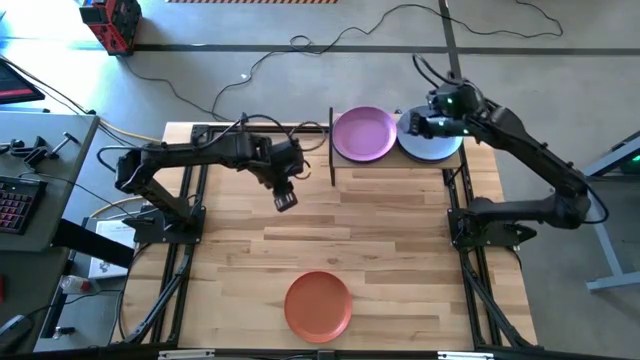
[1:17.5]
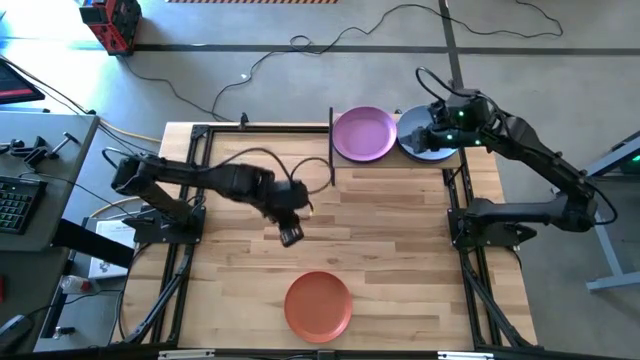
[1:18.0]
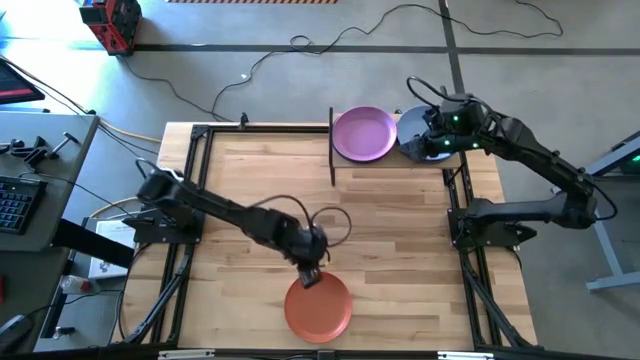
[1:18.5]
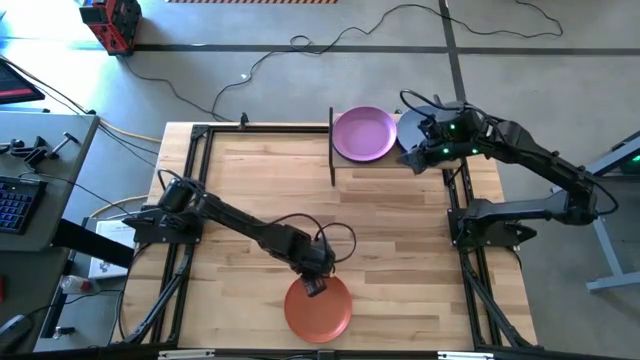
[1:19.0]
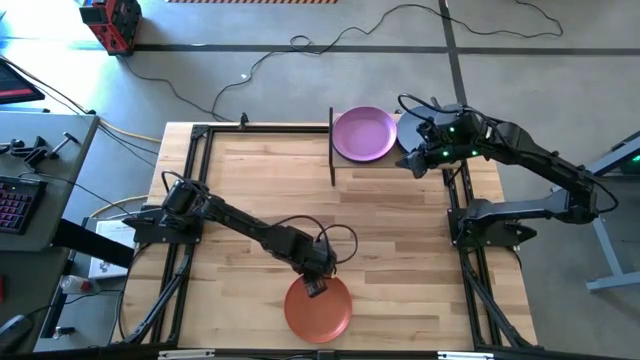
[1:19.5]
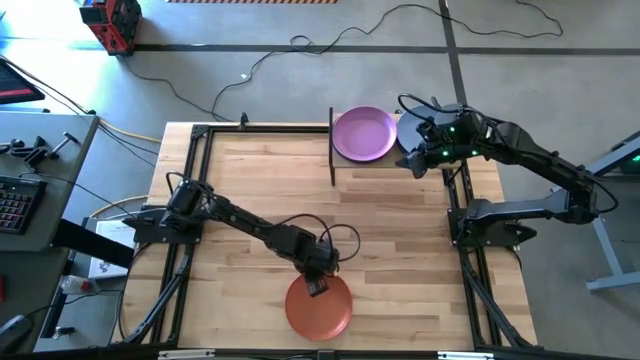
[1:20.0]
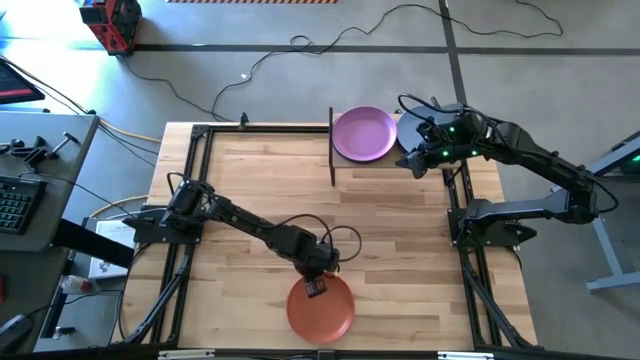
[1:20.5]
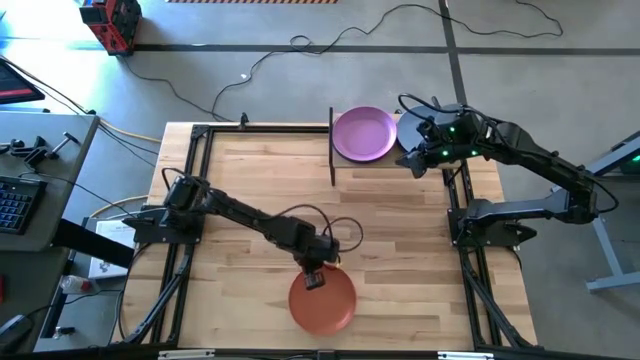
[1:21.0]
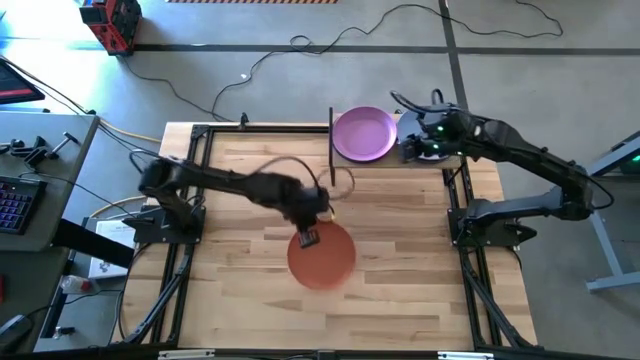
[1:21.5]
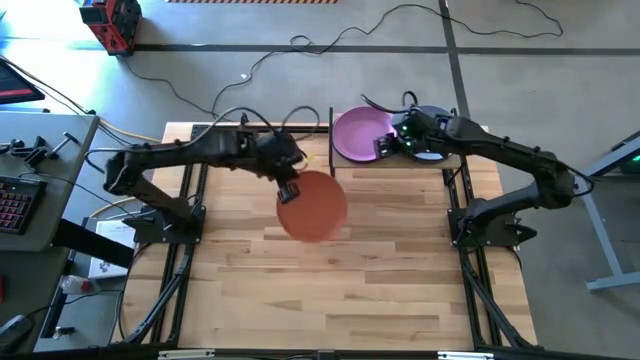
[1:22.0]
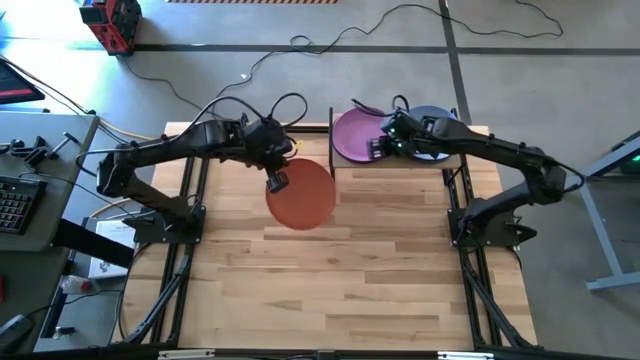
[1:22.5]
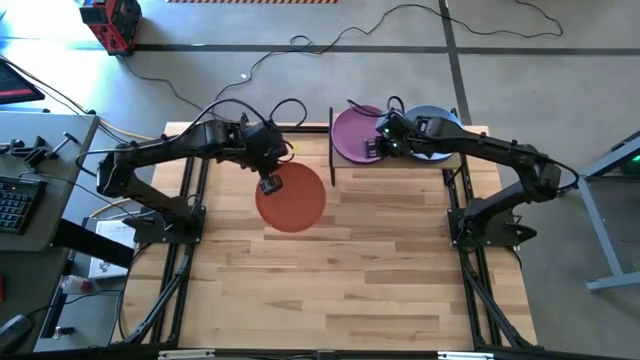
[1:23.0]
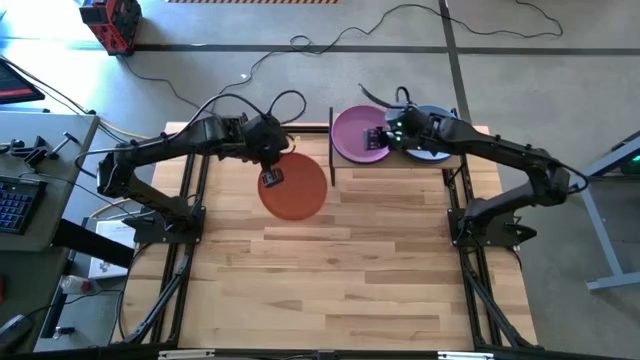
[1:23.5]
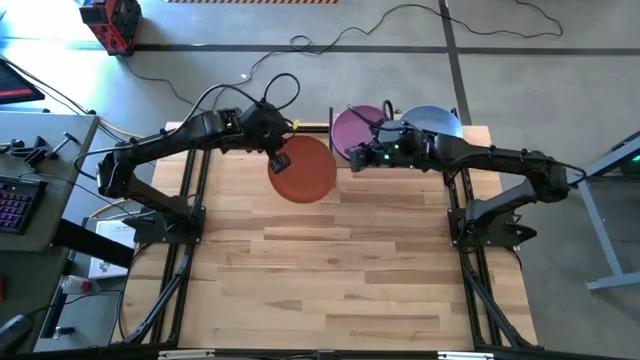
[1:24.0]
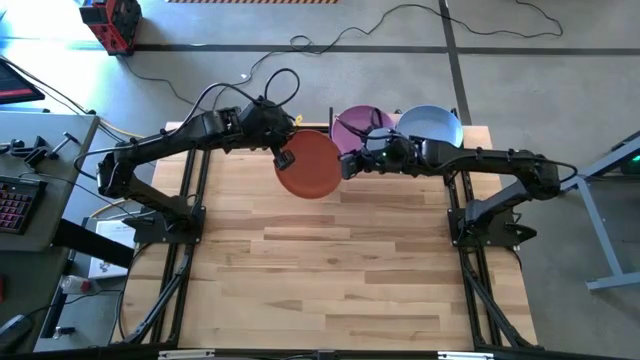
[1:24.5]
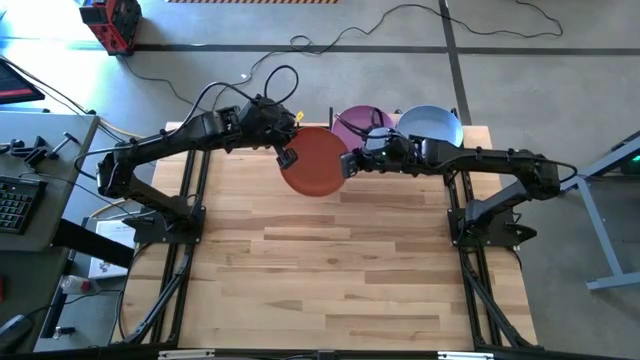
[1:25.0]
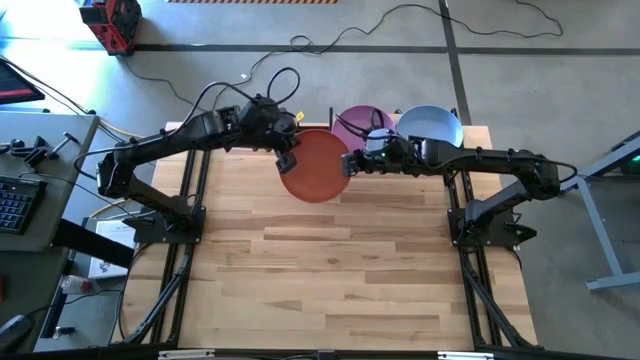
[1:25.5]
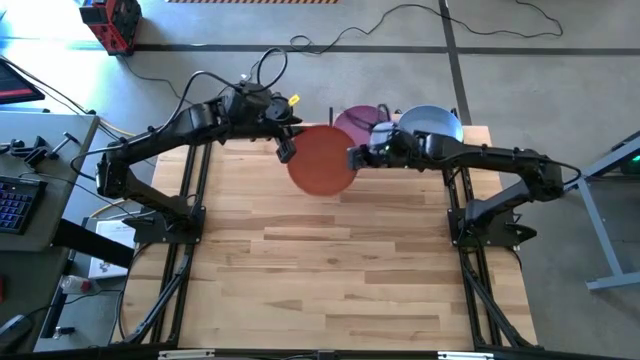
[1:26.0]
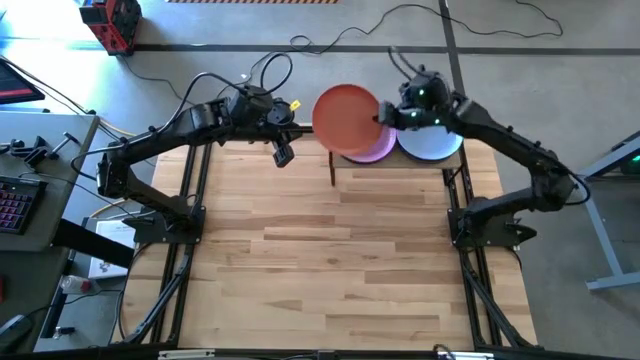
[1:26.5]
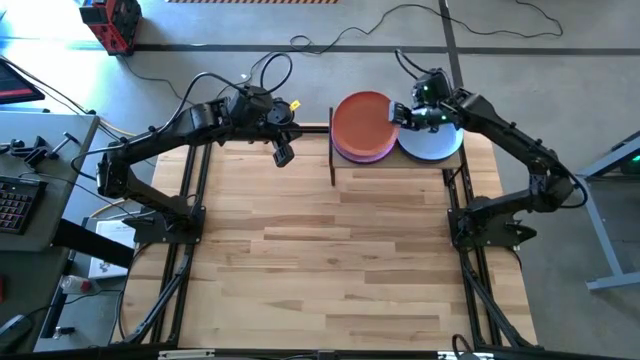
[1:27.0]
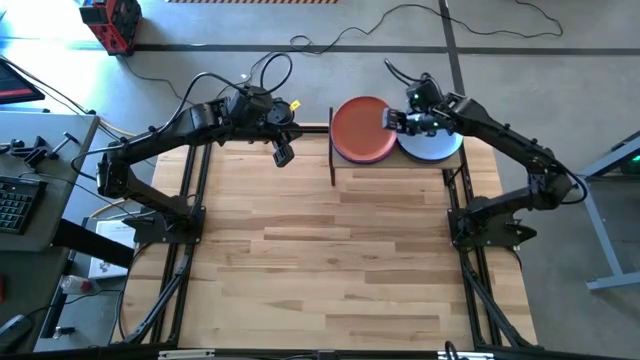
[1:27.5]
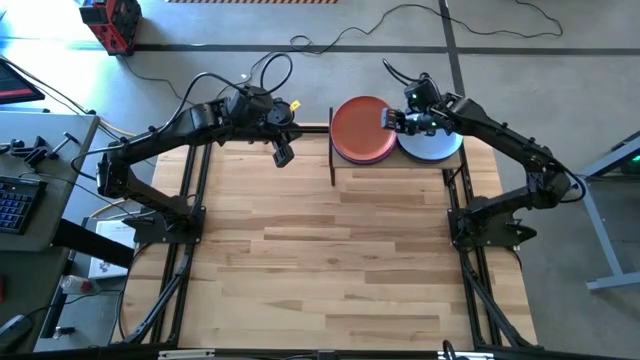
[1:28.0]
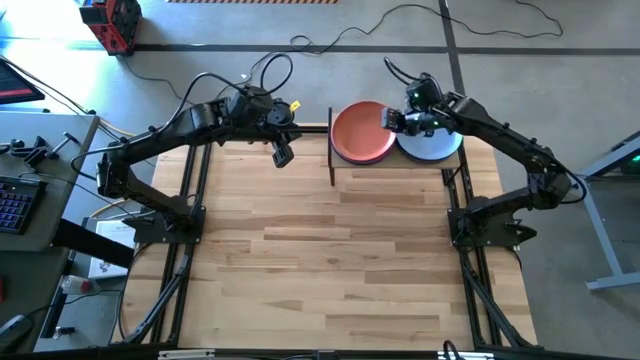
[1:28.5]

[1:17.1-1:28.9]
Task: Place and stack plates onto a shelf
Stack the orange plate on top of the purple plate on the shelf

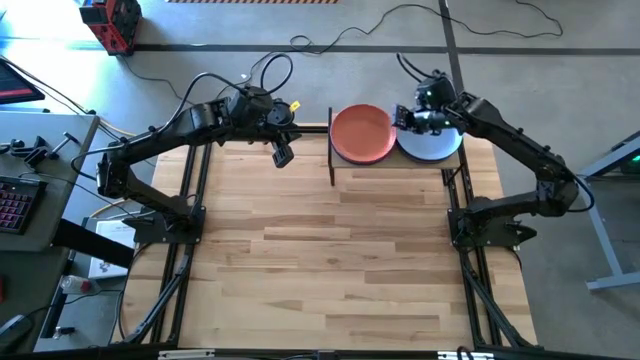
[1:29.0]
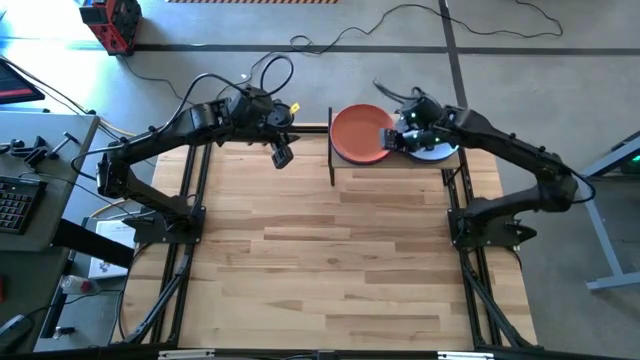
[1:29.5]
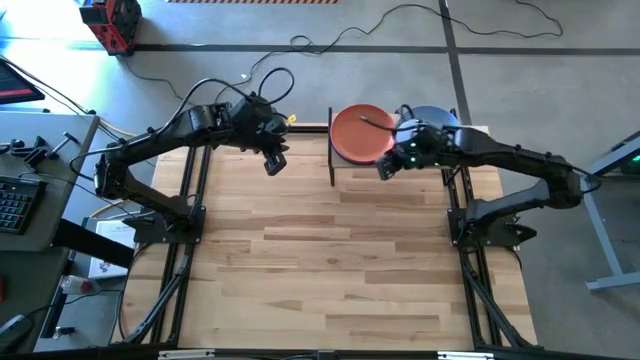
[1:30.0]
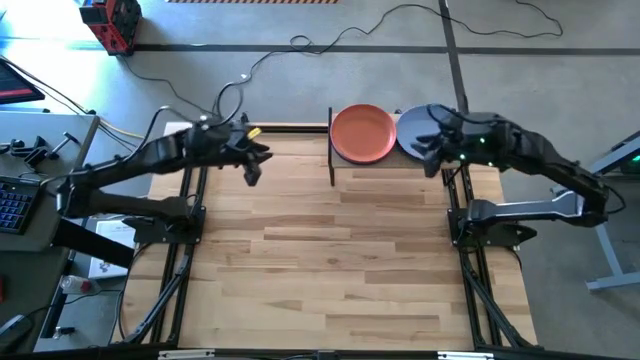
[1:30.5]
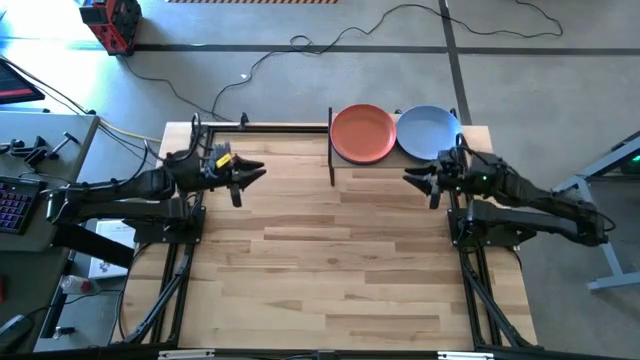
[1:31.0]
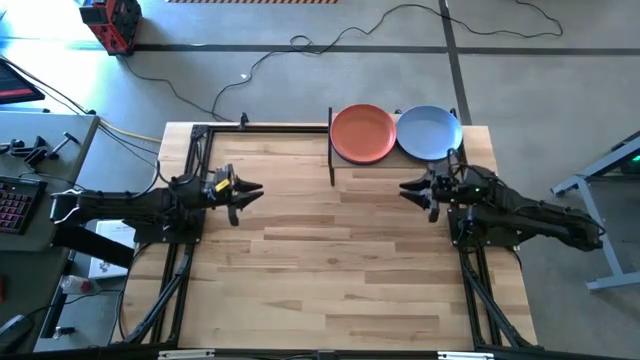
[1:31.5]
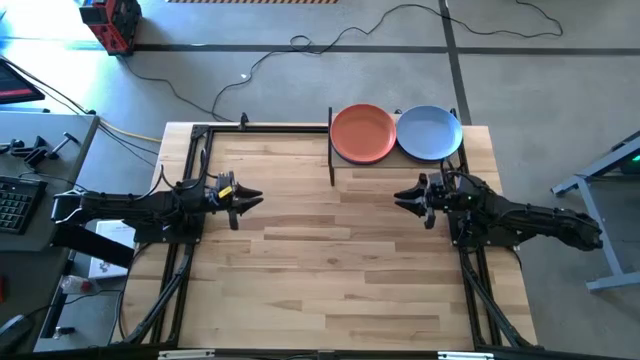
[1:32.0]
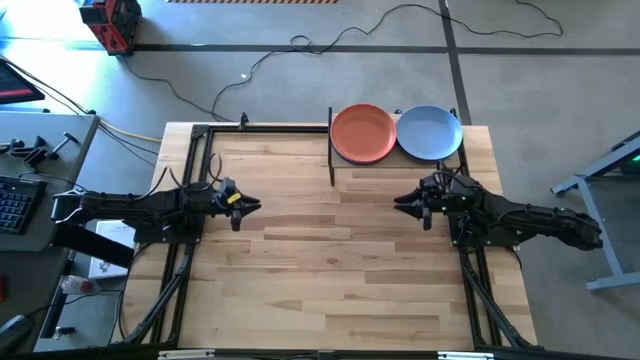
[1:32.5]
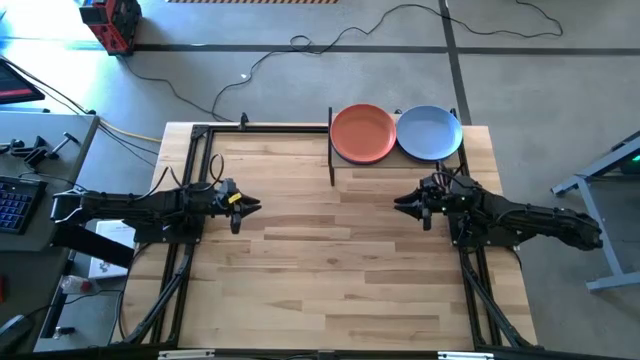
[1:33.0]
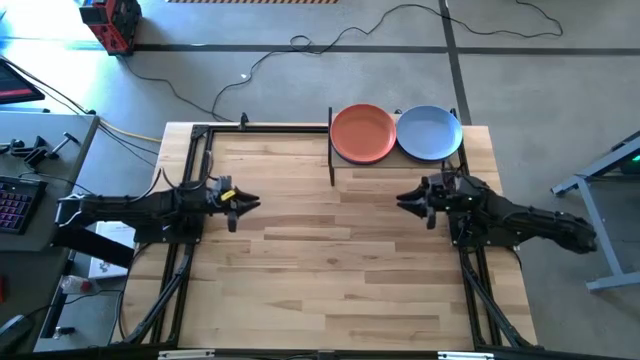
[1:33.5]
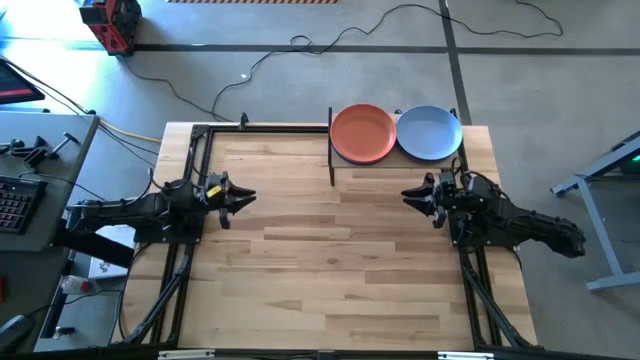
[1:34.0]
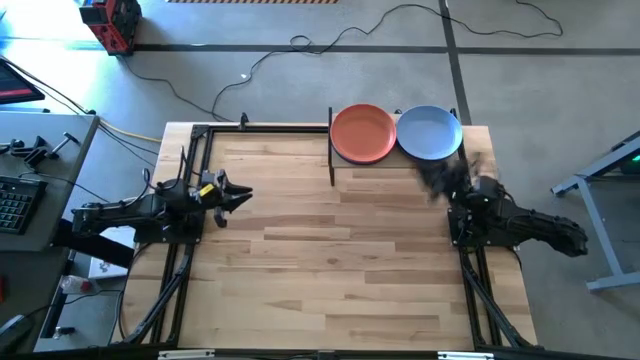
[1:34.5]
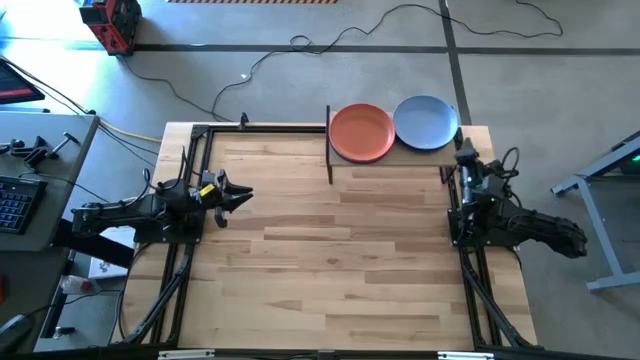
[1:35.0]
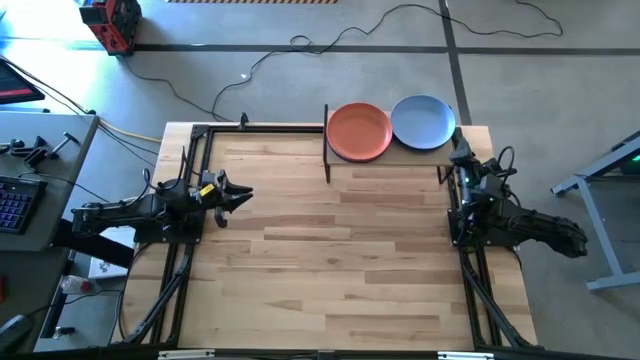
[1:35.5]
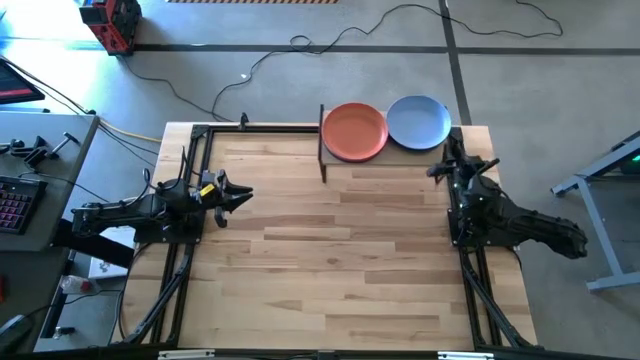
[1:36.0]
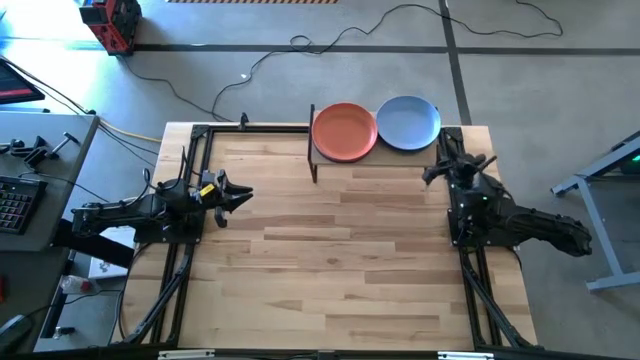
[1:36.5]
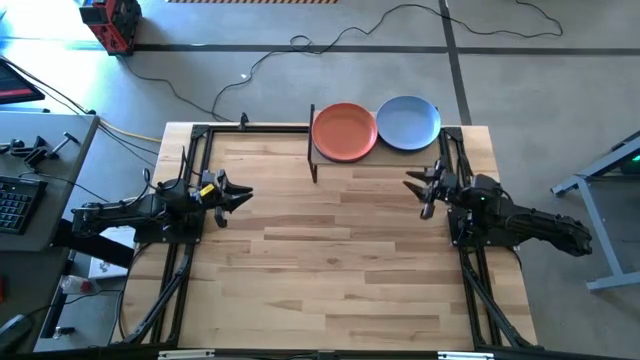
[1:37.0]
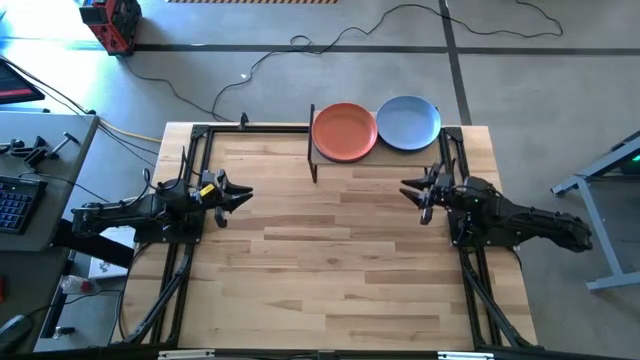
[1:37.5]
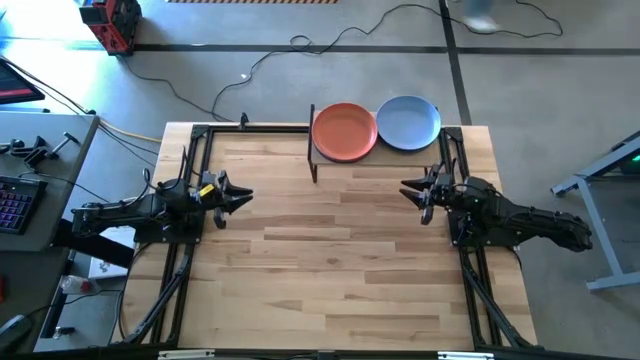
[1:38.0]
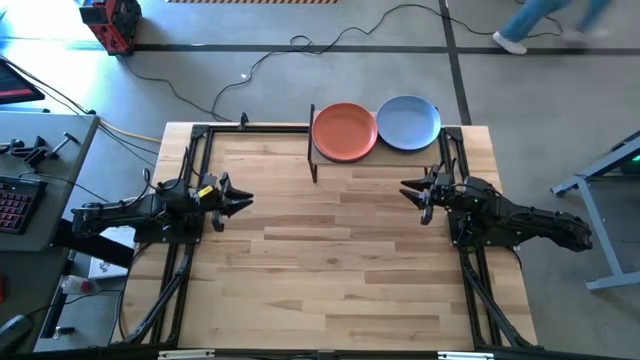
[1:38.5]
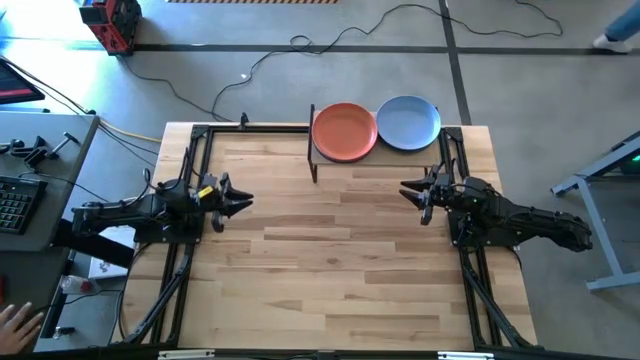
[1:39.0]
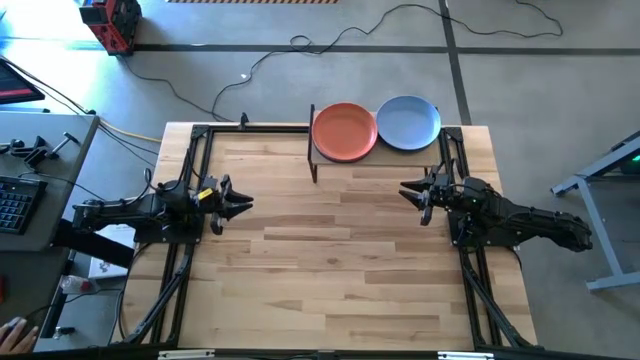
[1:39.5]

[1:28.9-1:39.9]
Return to Home Position
